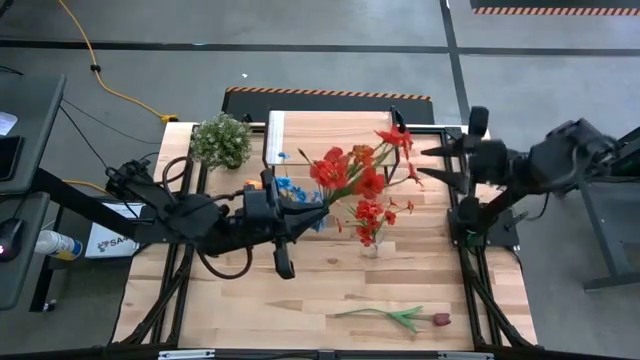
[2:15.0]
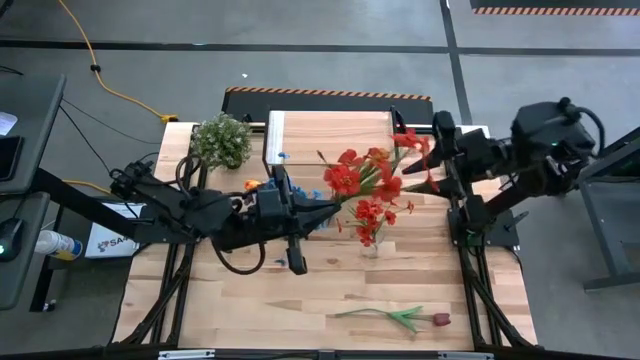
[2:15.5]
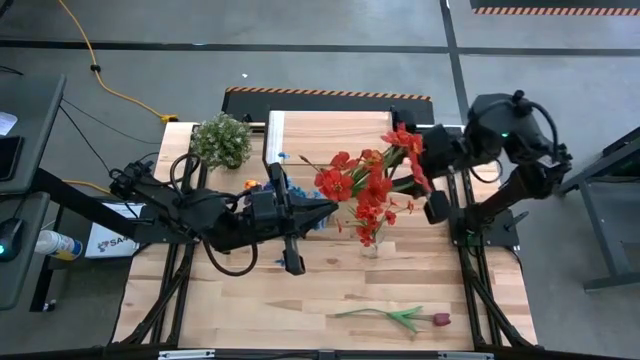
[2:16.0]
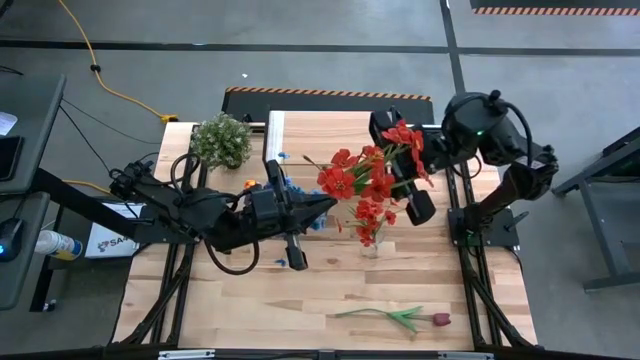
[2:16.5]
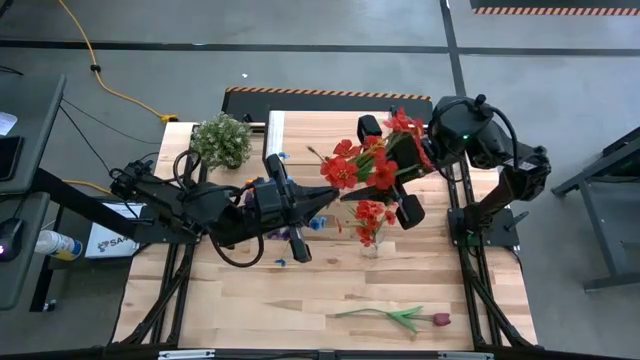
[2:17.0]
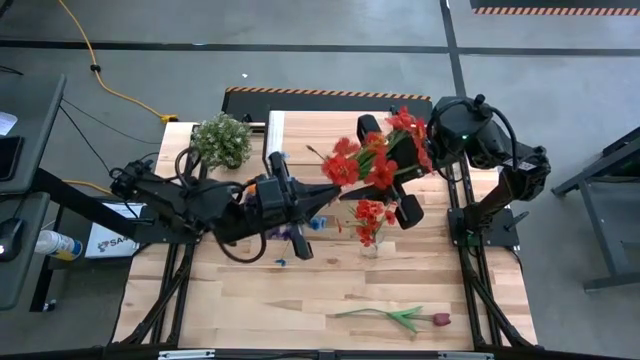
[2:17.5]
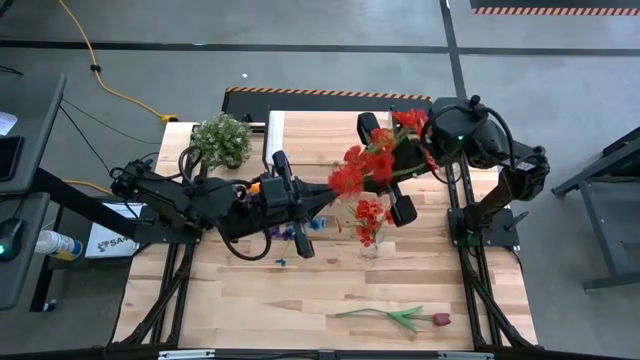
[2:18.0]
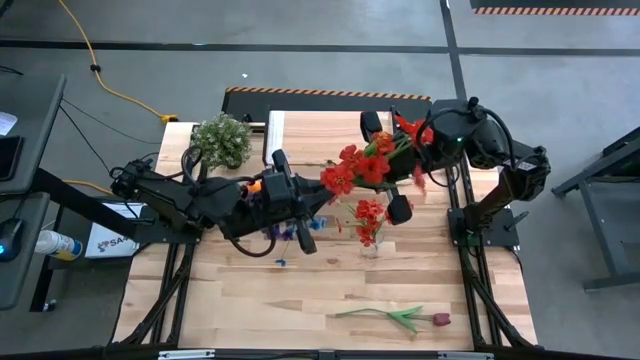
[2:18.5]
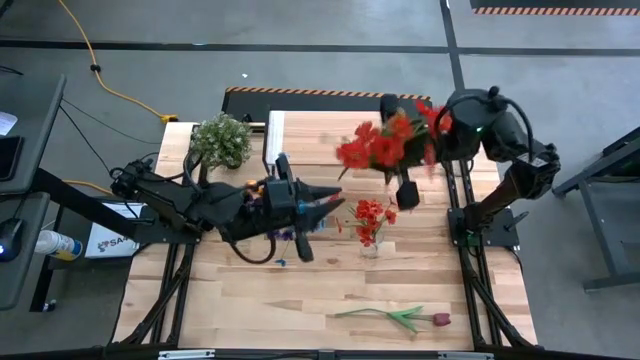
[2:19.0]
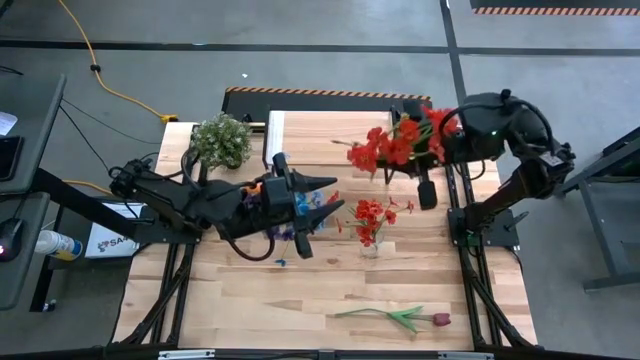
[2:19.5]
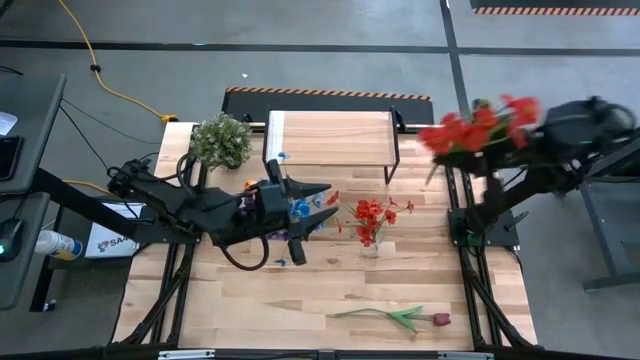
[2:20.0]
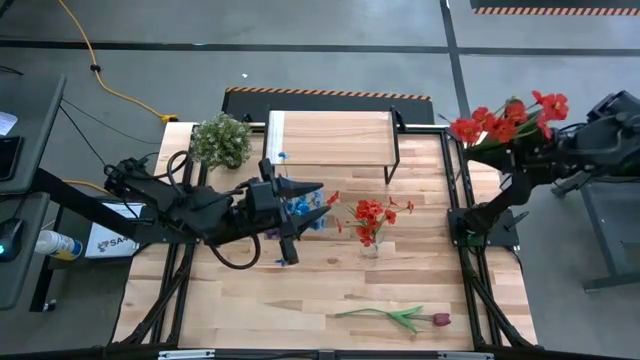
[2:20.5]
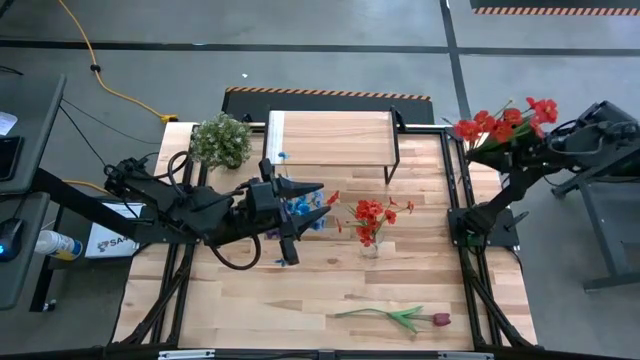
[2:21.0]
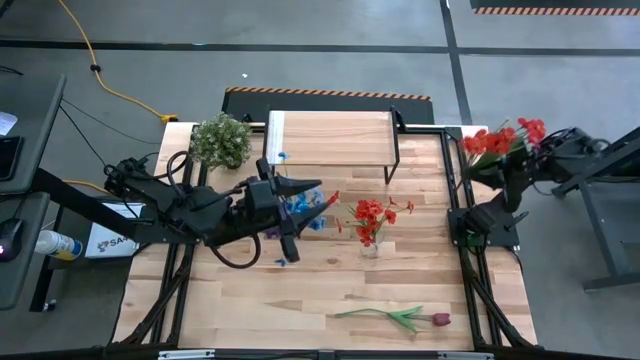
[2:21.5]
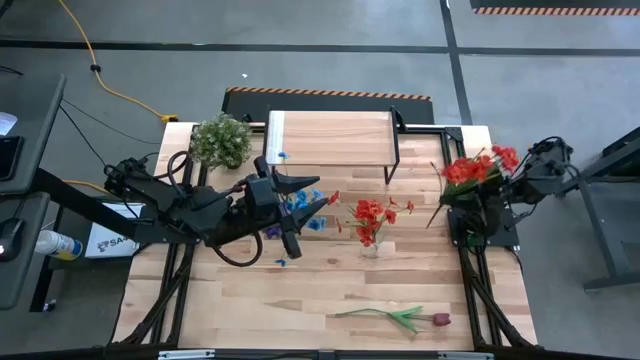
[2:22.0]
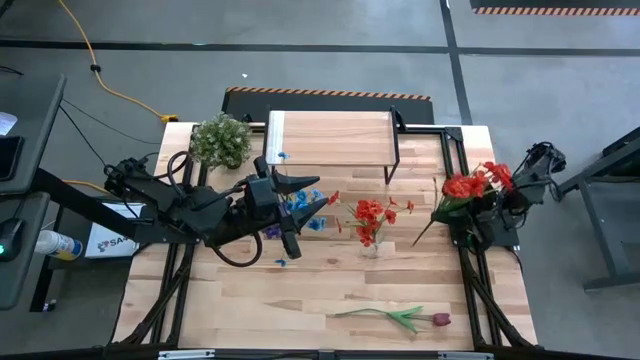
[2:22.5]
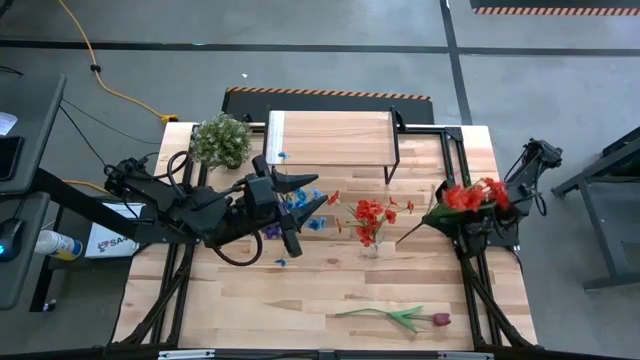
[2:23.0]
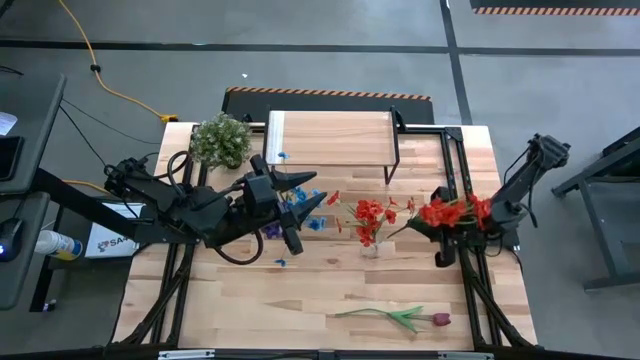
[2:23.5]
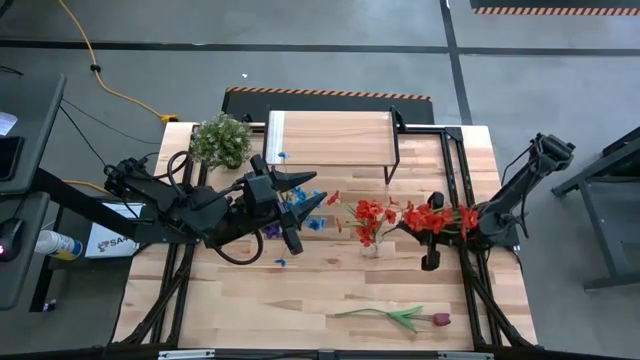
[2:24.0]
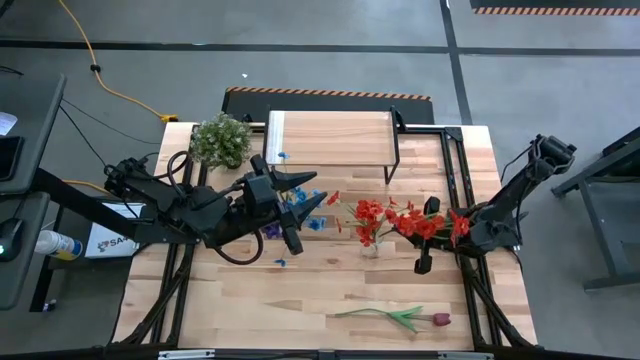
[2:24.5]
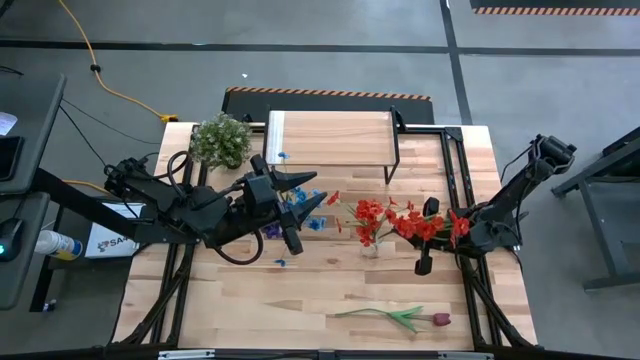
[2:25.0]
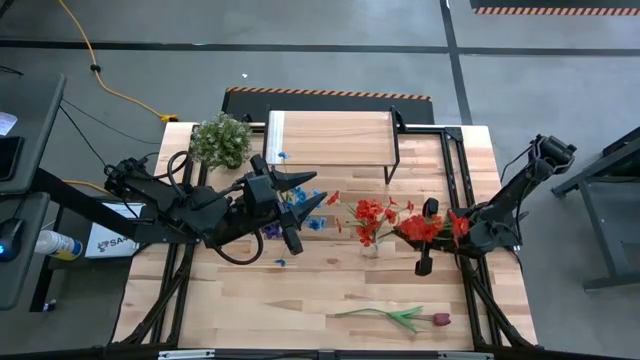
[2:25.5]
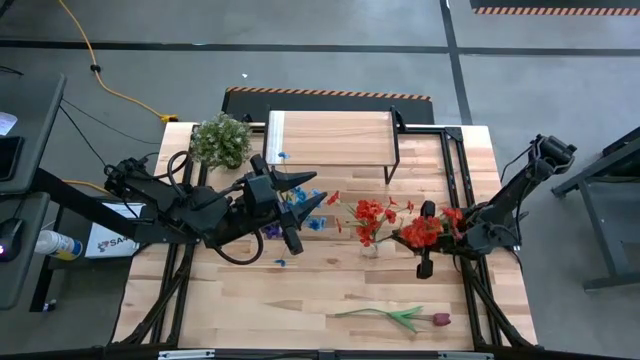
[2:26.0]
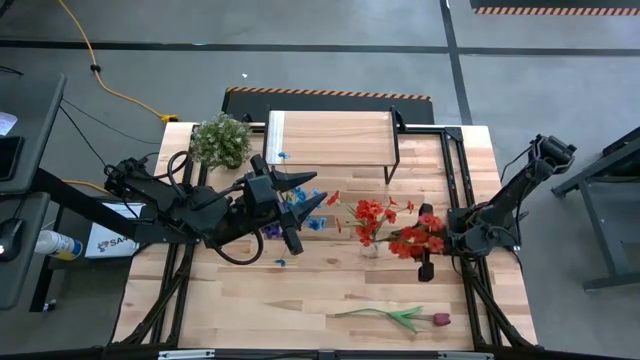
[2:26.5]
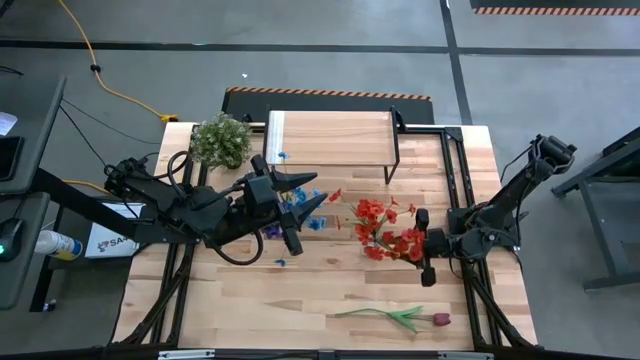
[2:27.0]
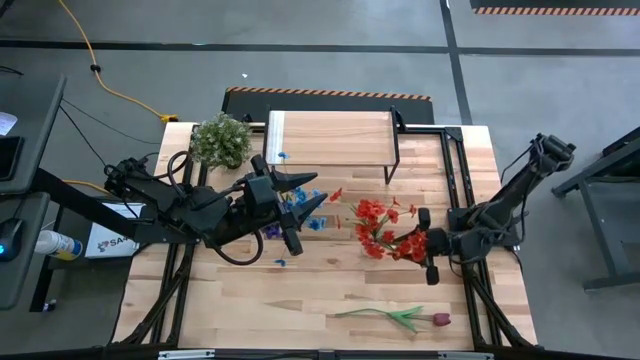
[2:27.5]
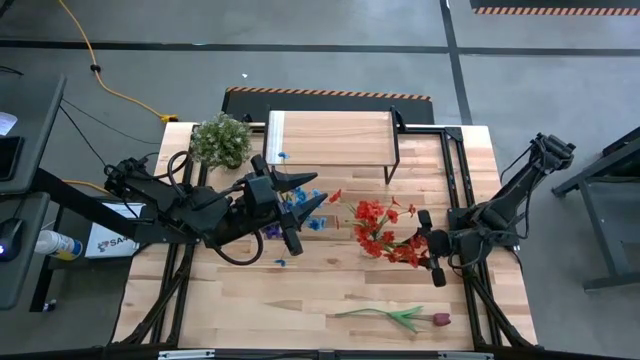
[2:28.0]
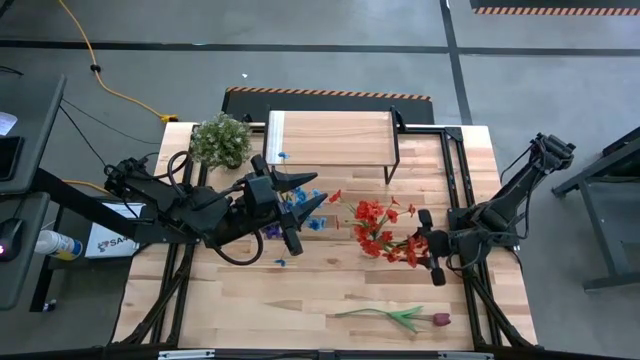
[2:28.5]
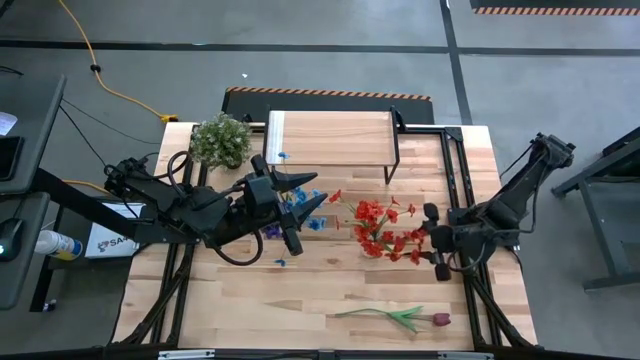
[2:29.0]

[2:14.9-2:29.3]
Task: Pick and place flowers into a vace then onto a shelf
Put the red flowers into the right transparent vase

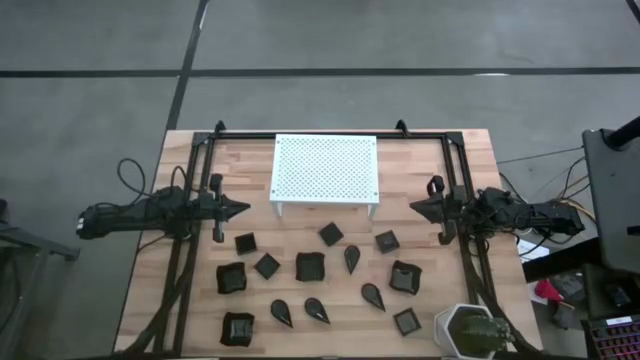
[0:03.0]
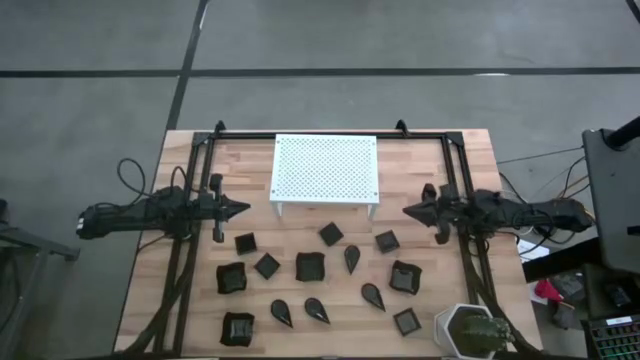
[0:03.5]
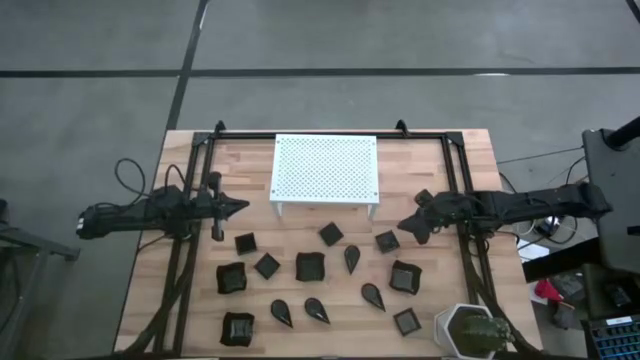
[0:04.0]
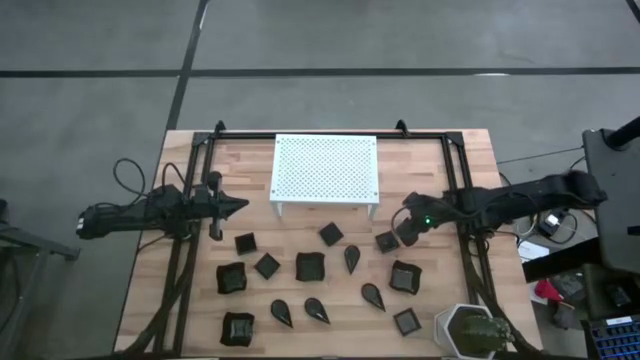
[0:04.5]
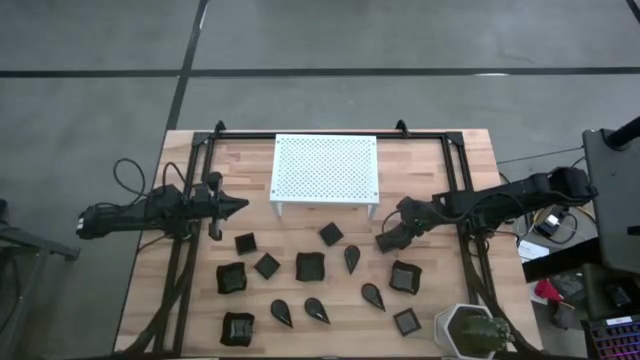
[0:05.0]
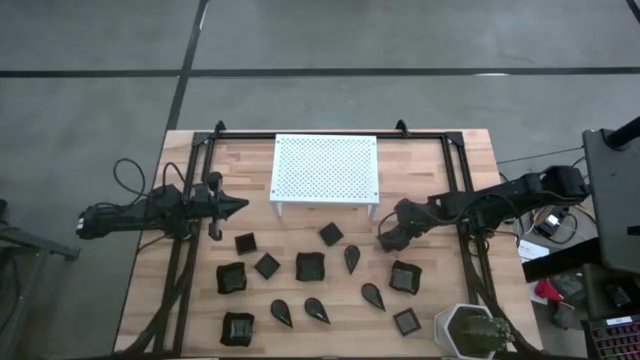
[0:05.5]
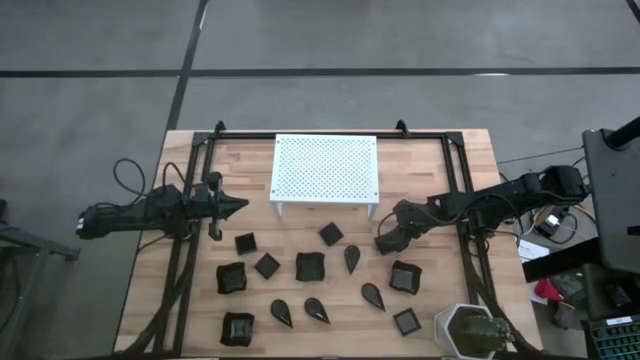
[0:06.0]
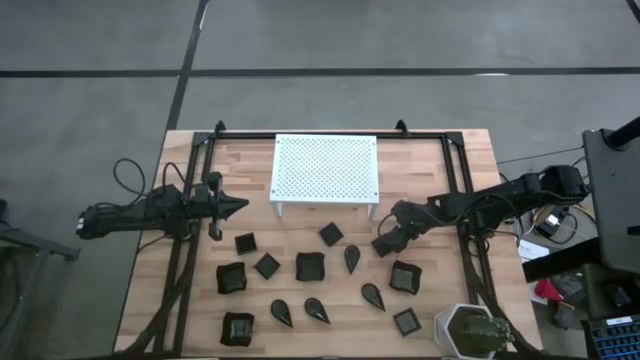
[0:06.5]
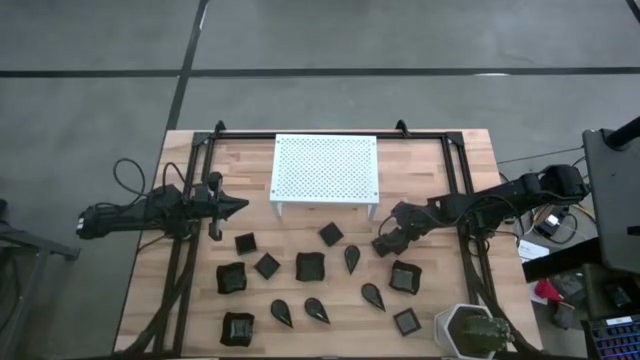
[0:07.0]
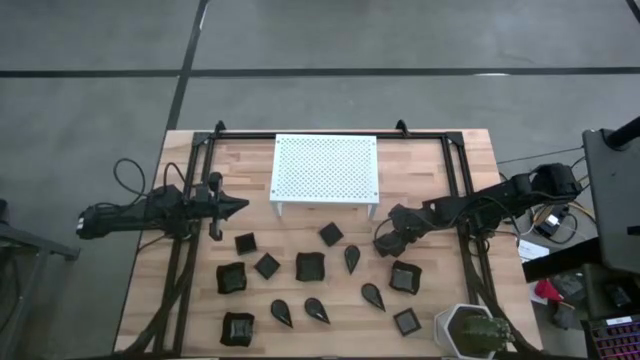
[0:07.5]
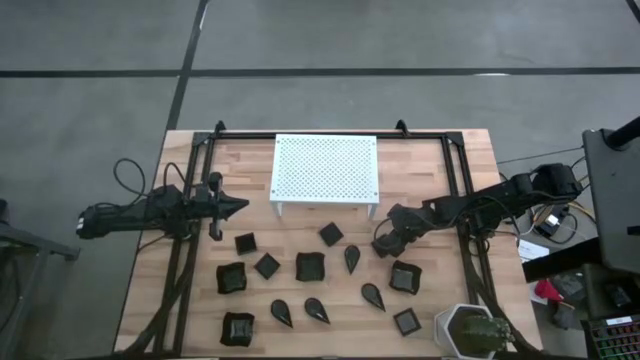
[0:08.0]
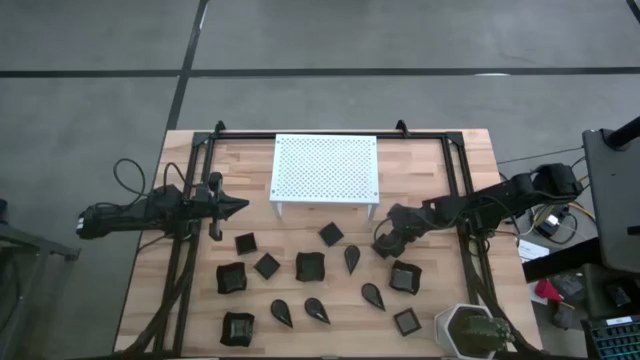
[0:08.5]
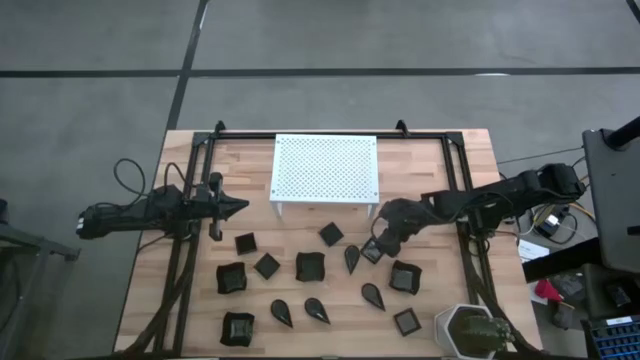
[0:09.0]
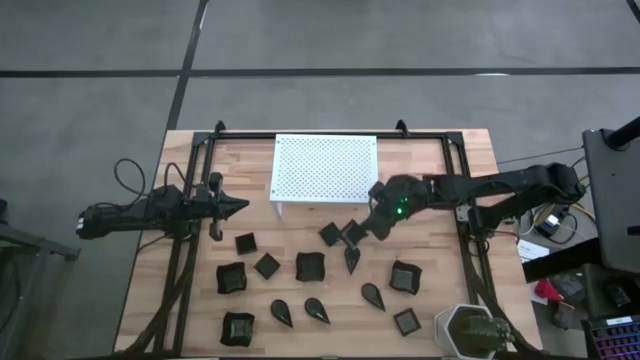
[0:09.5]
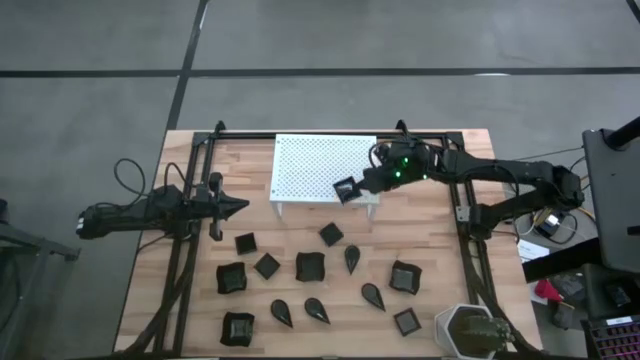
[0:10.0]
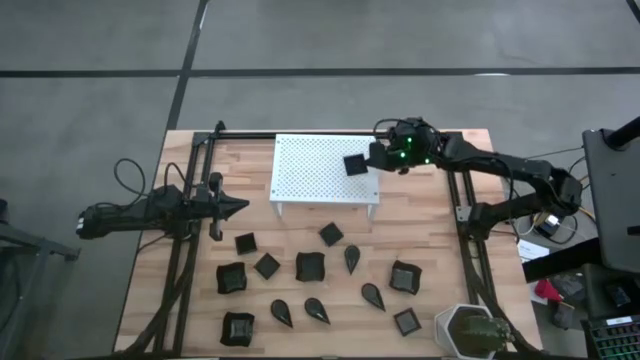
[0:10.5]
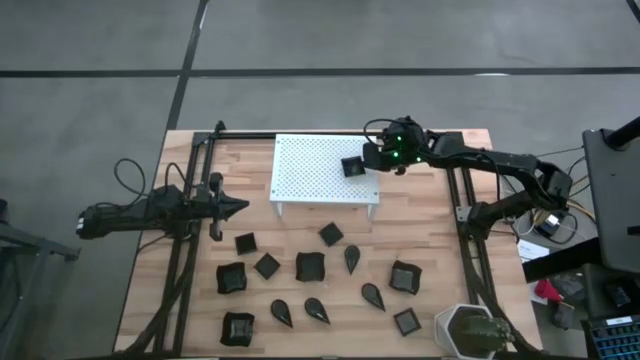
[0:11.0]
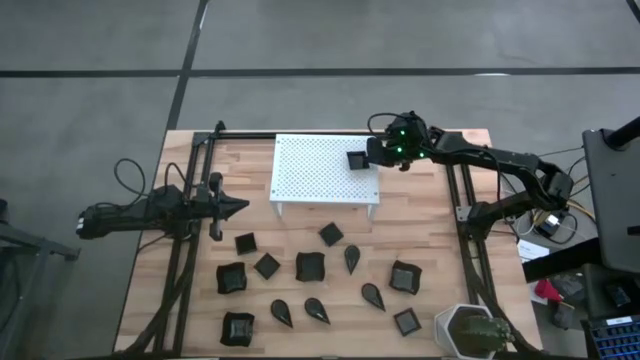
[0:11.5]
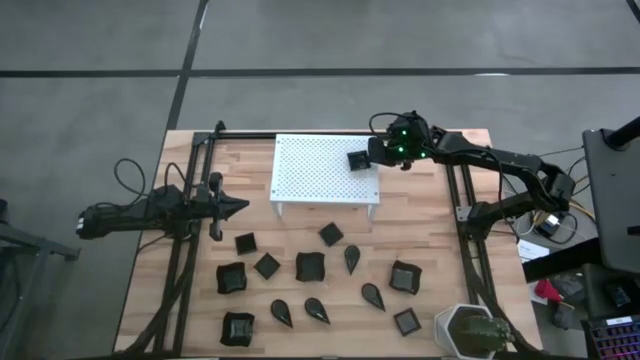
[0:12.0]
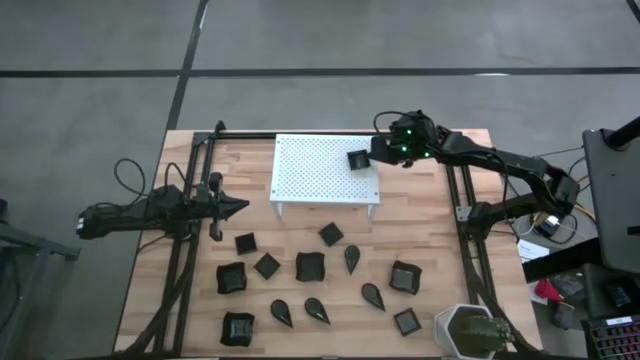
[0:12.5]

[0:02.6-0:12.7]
Task: Pick & Place Mini shaped plates
Put the square plate on the shelf
